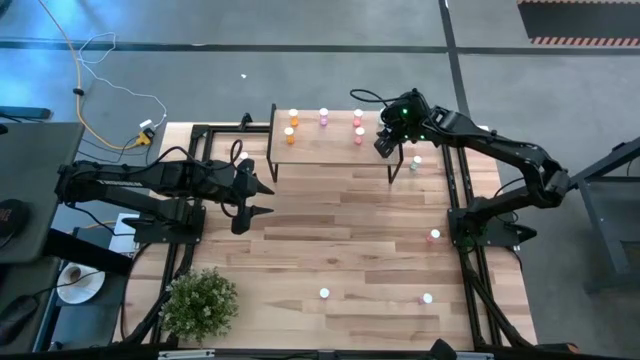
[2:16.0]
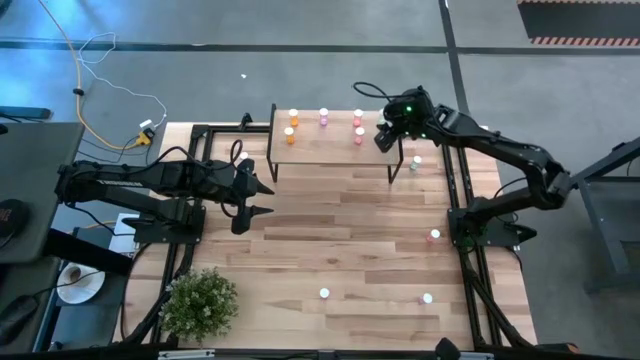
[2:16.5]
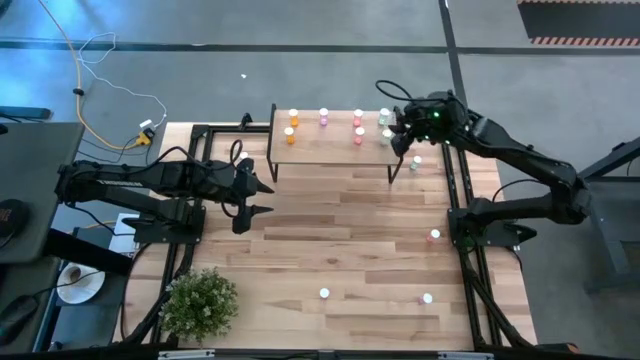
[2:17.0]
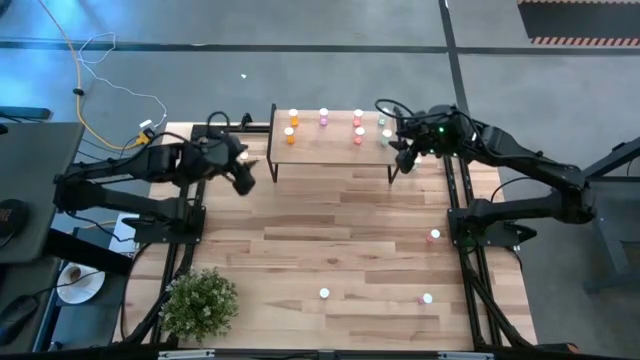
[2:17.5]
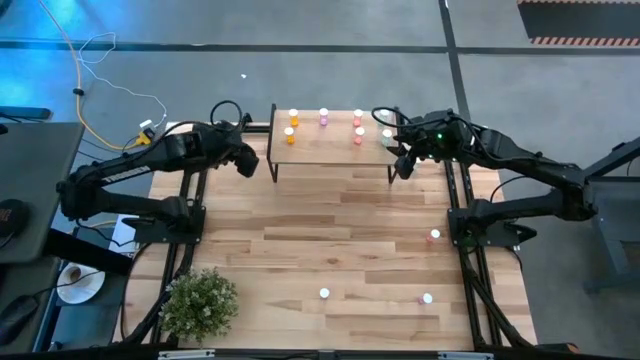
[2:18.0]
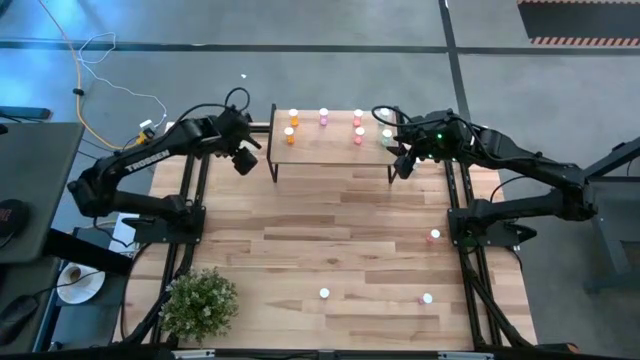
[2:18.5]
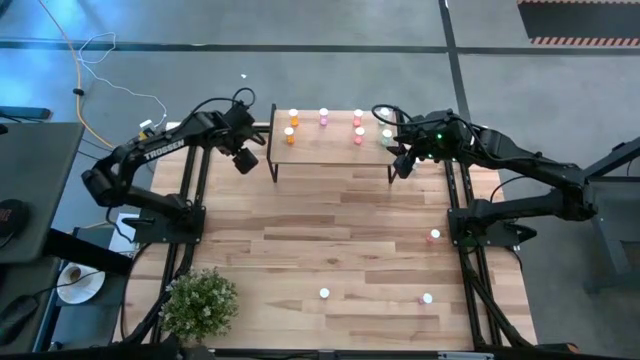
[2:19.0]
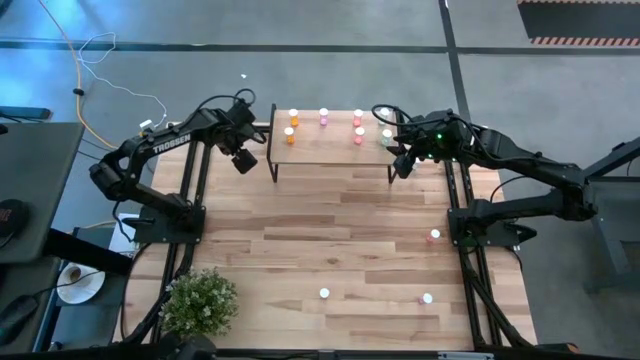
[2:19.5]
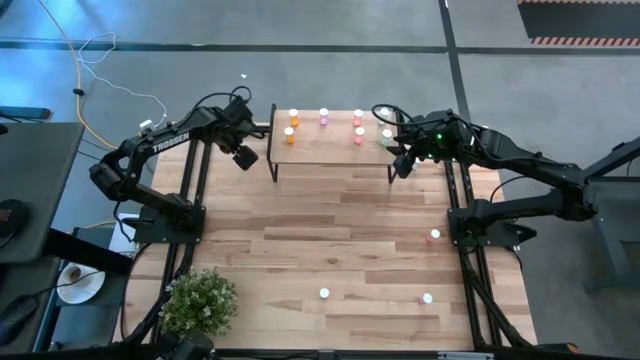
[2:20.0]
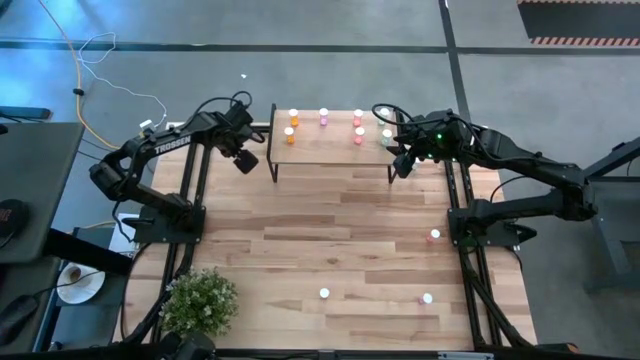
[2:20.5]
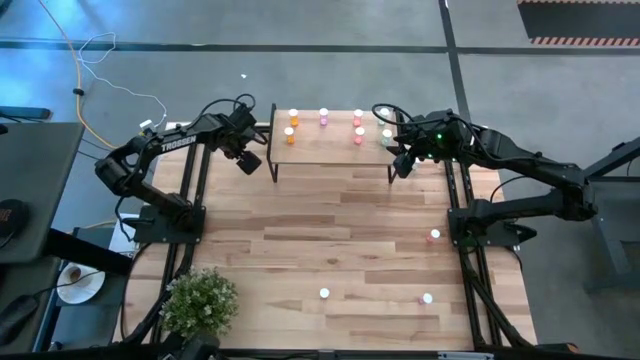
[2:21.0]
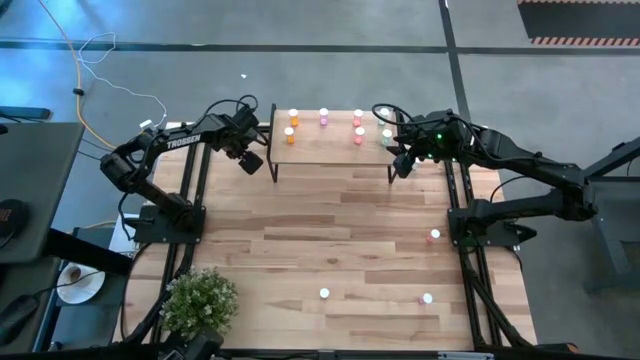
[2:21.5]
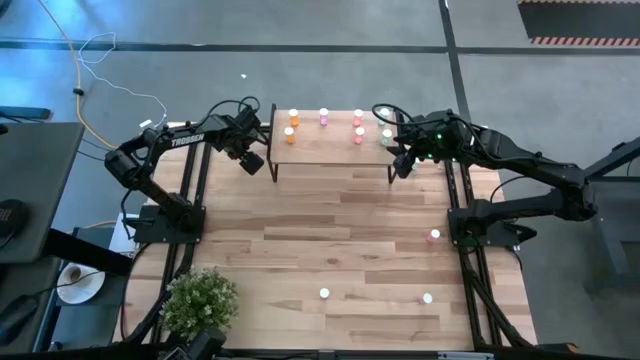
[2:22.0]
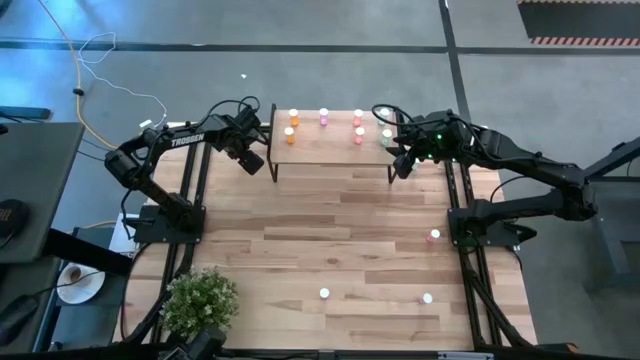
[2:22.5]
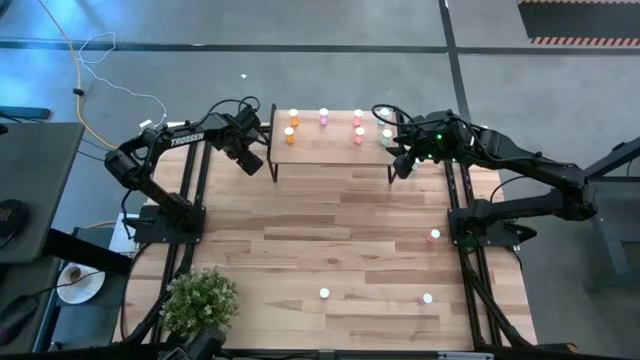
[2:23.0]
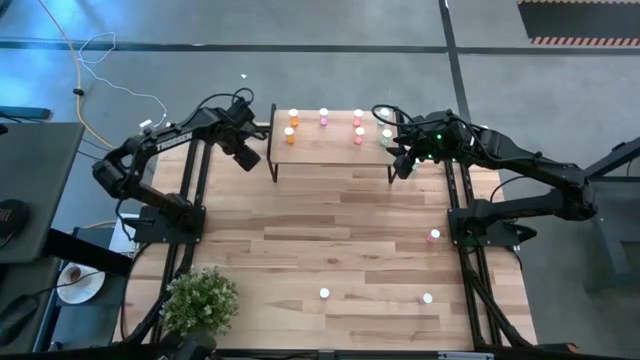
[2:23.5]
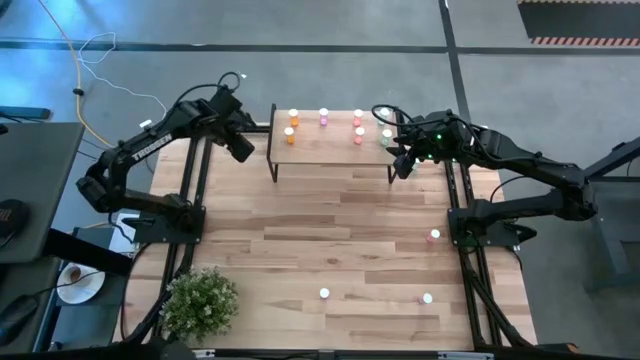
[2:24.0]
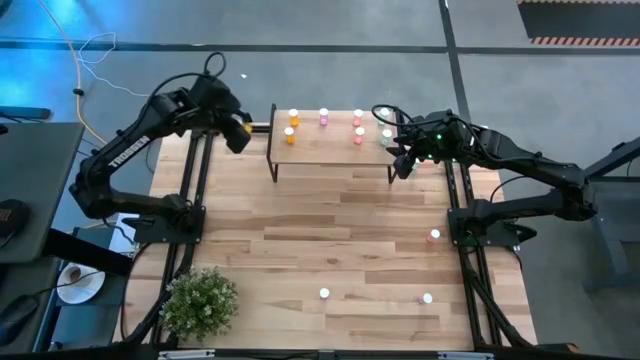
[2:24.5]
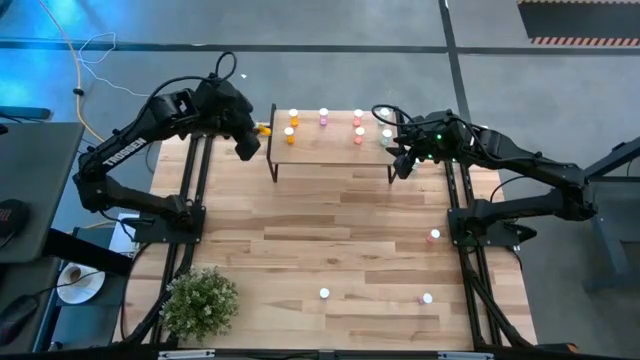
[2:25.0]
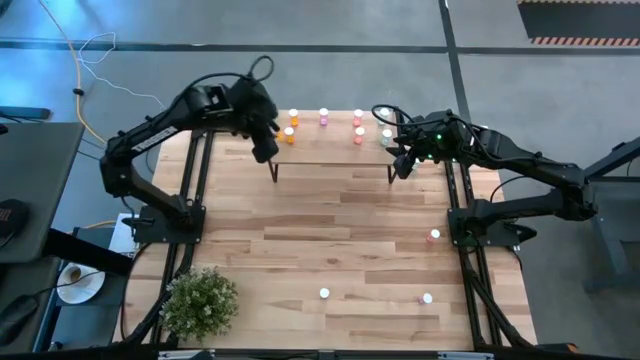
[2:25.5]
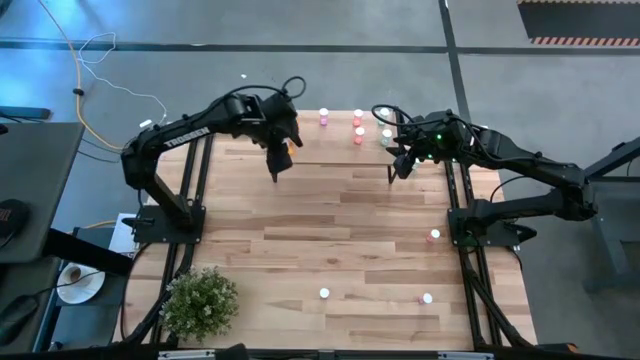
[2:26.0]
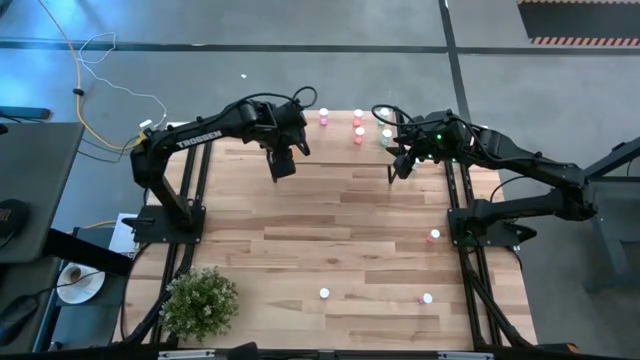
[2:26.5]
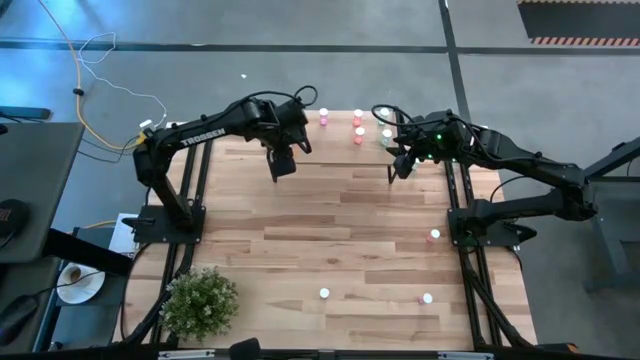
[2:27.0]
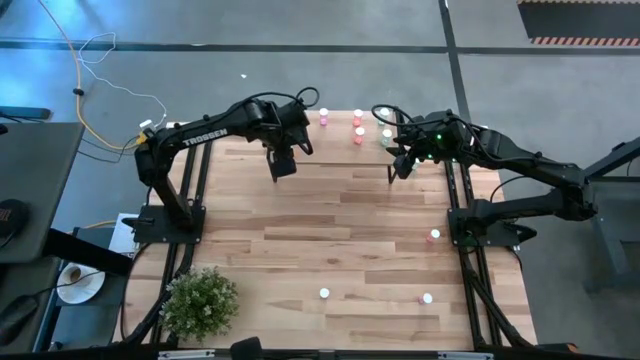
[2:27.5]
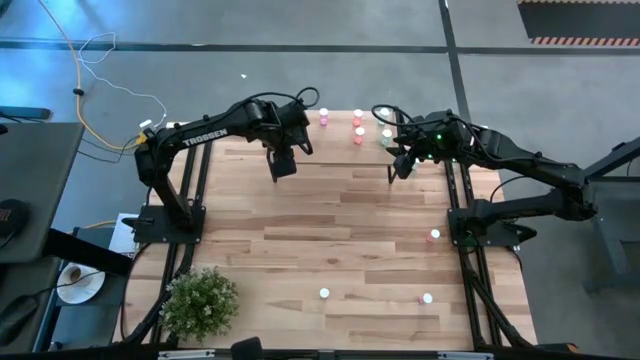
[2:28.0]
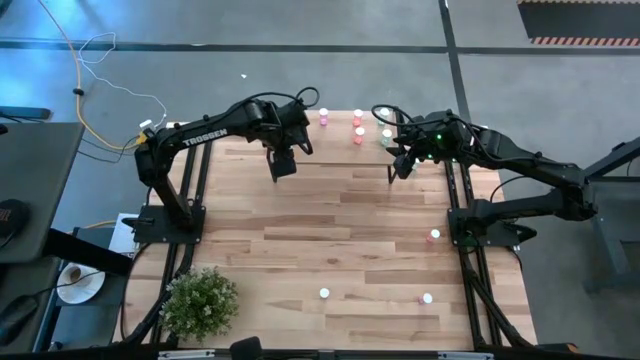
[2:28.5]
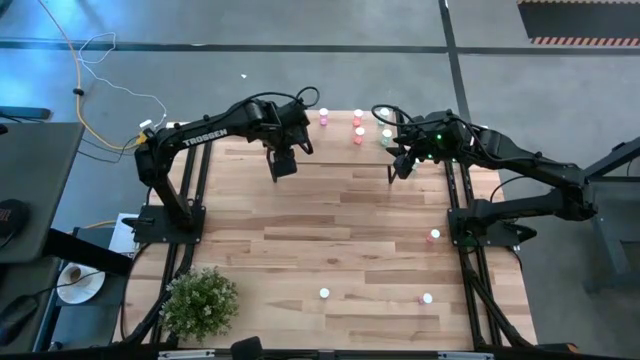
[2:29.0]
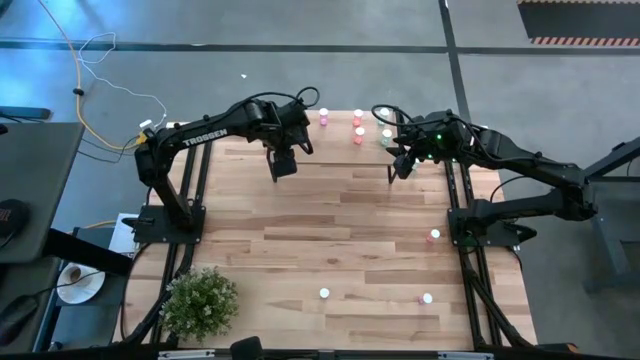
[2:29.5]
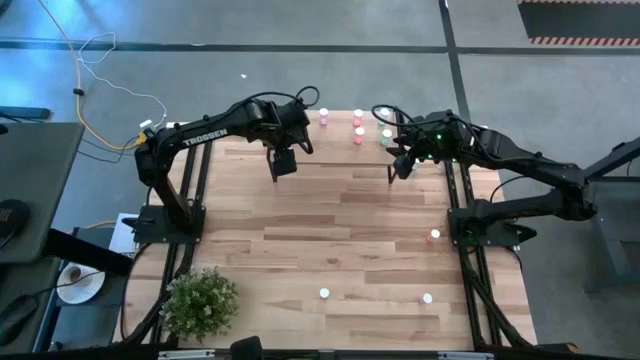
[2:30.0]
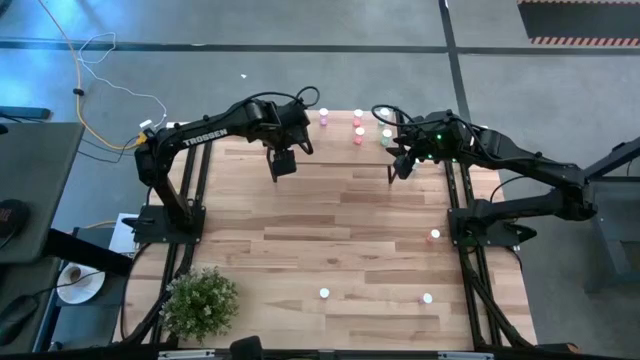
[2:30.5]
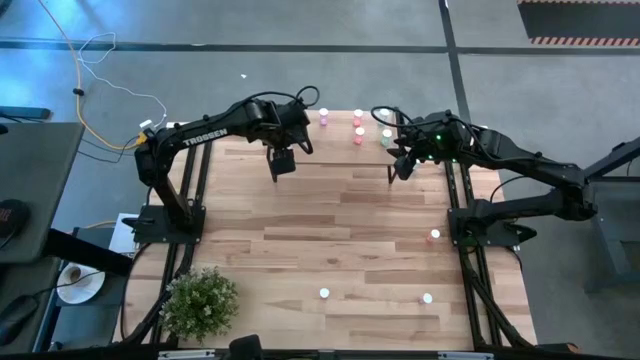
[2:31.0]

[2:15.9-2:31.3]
Task: Pick and place medicine bottles onto shelf by color
Put the orange pill bottle on the shelf aligned with the other orange pill bottles

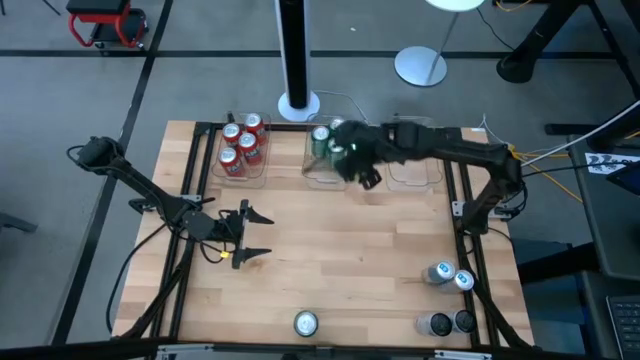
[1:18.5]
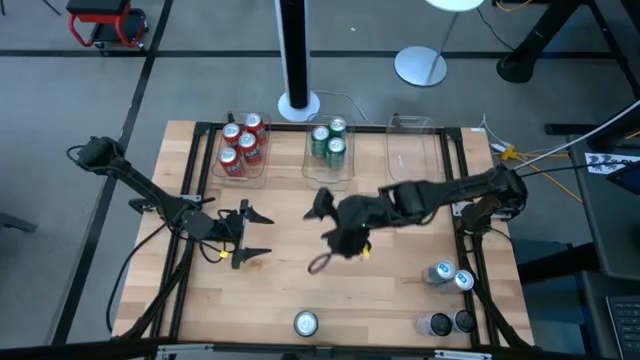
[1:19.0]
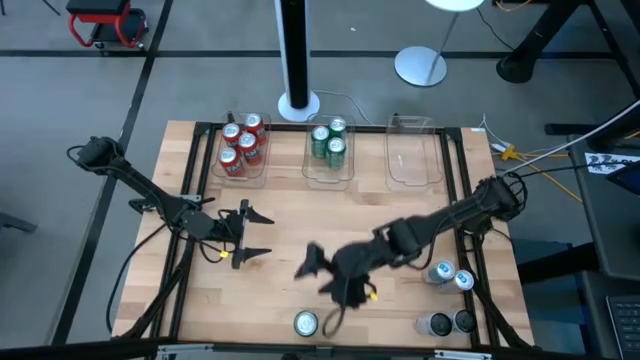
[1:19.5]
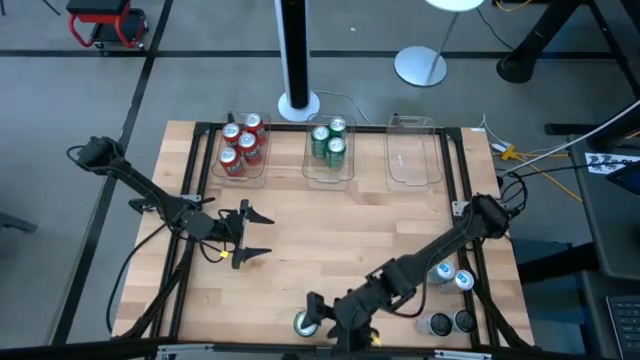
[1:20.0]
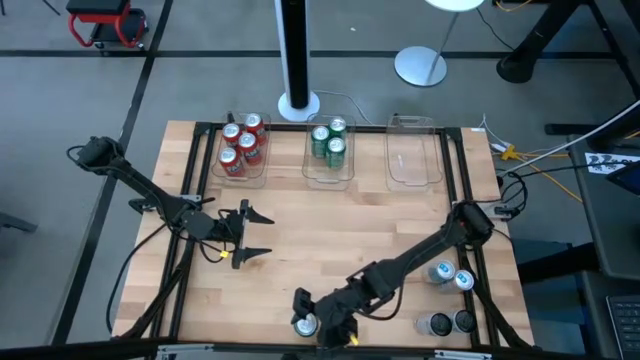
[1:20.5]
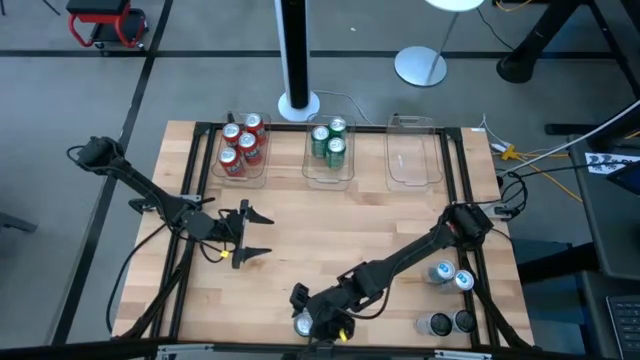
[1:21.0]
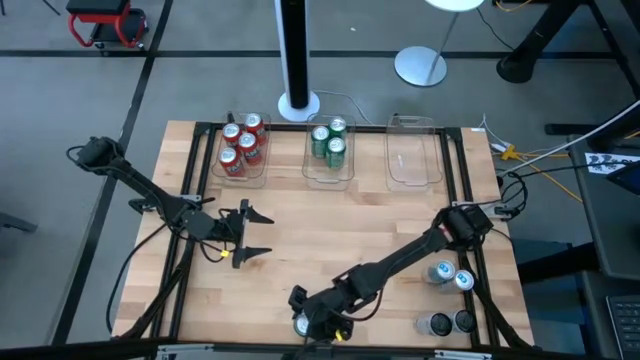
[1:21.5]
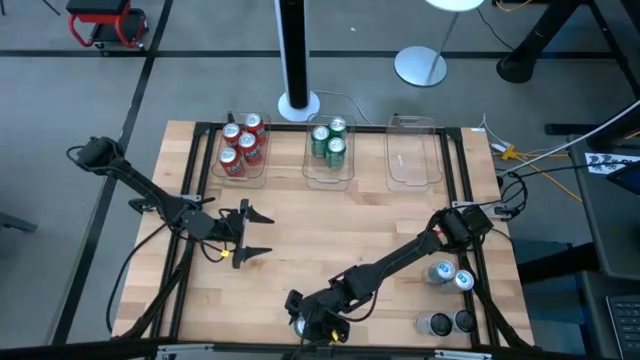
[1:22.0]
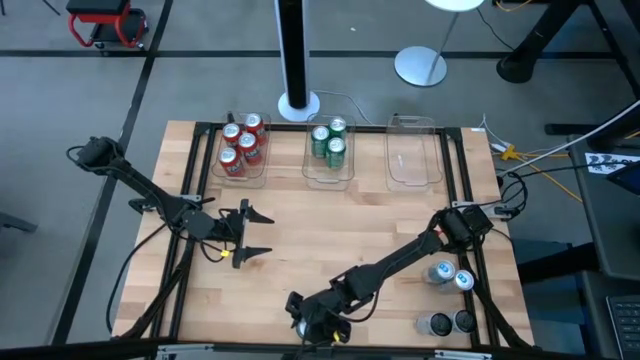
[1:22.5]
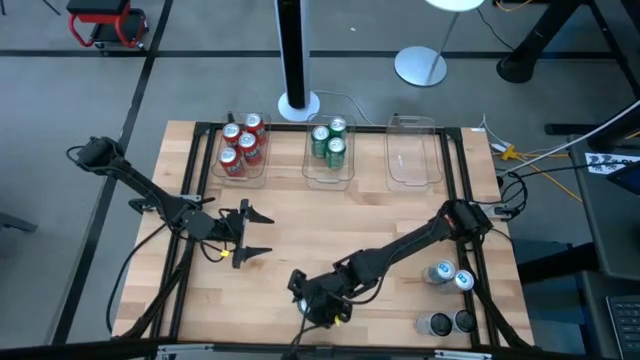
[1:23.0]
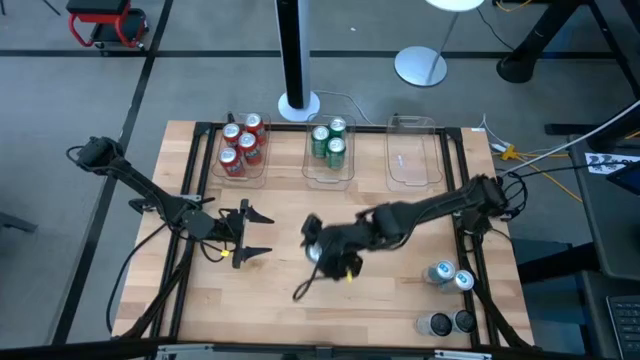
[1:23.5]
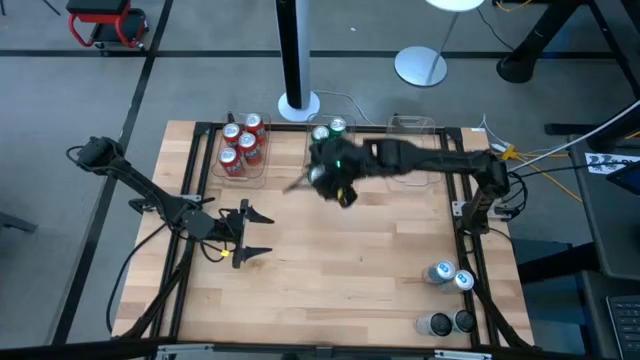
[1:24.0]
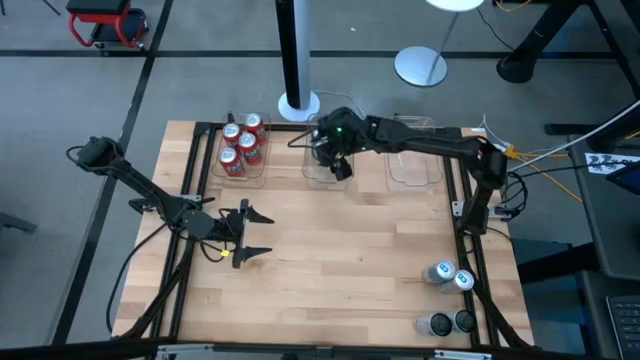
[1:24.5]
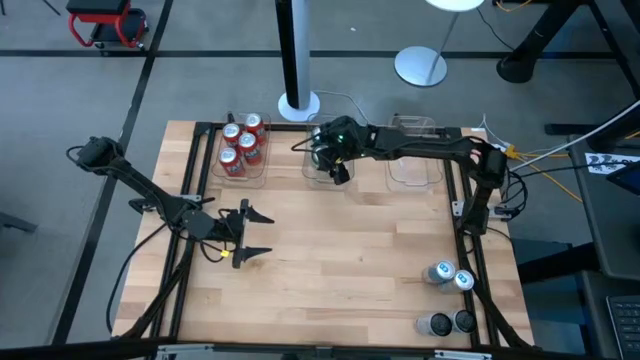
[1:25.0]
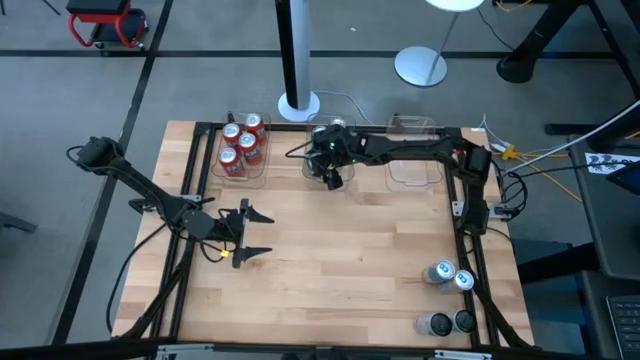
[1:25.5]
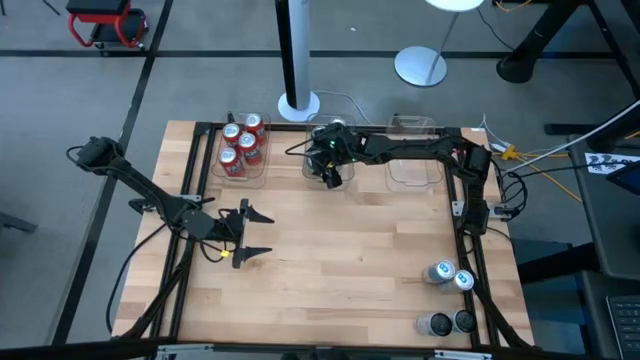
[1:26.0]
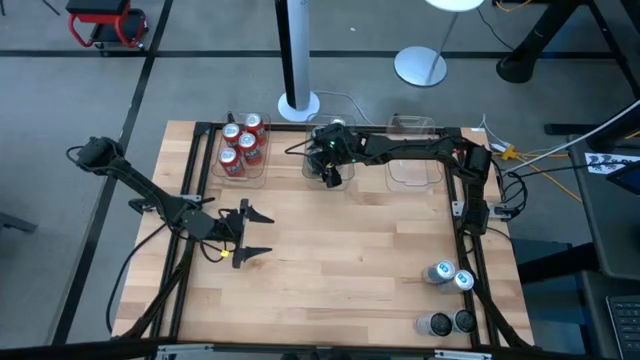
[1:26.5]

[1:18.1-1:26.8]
Task: Sort soda cans
Put the green soda can into the middle transparent bin
